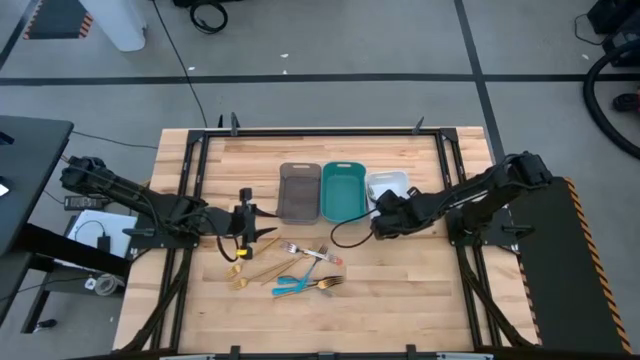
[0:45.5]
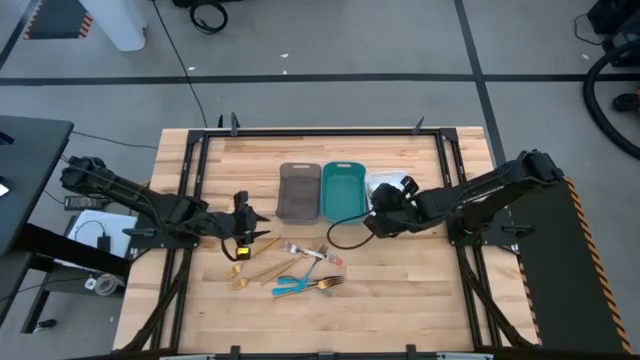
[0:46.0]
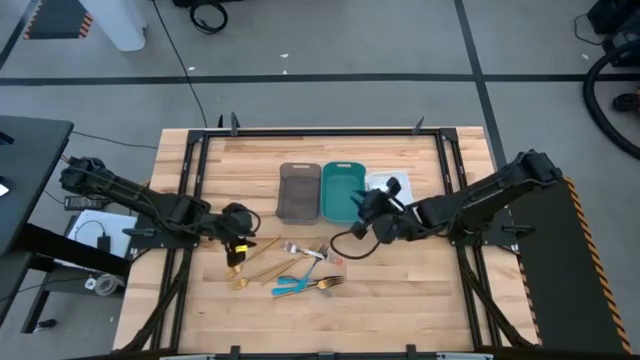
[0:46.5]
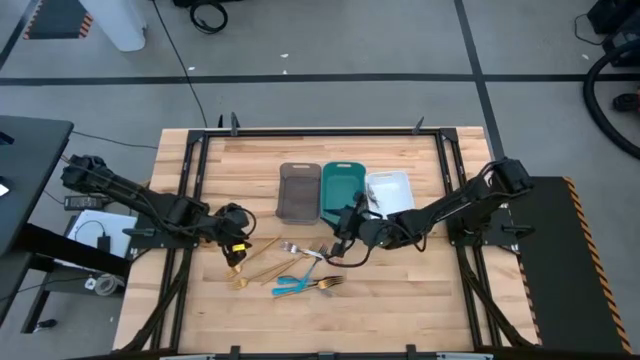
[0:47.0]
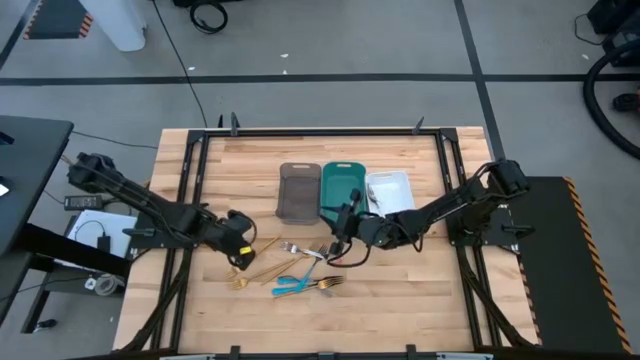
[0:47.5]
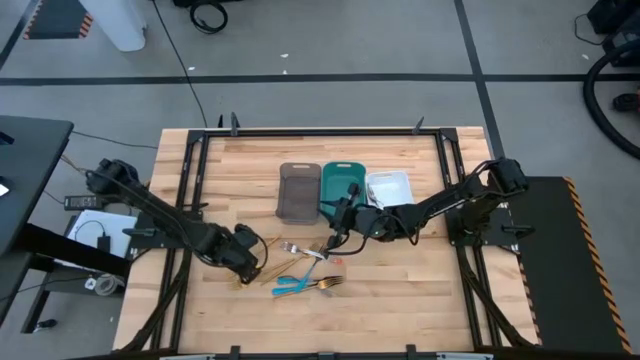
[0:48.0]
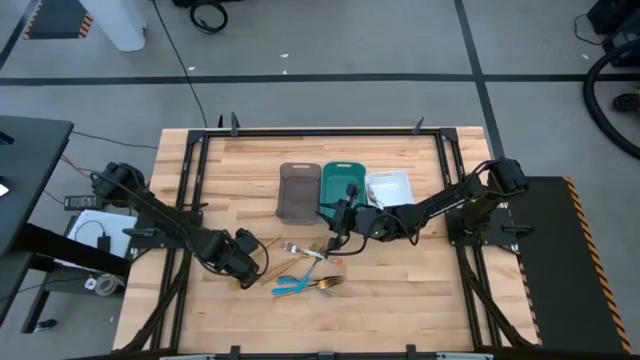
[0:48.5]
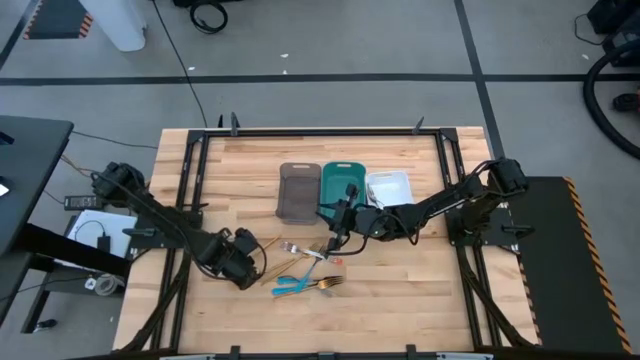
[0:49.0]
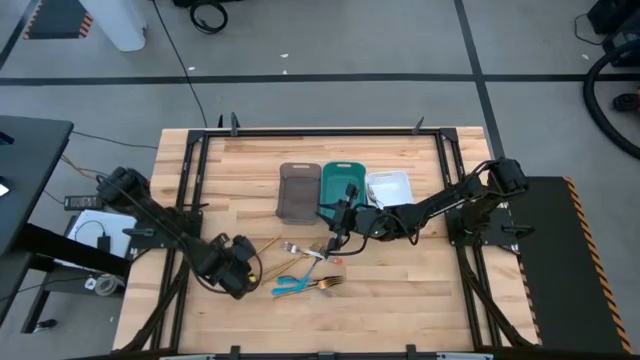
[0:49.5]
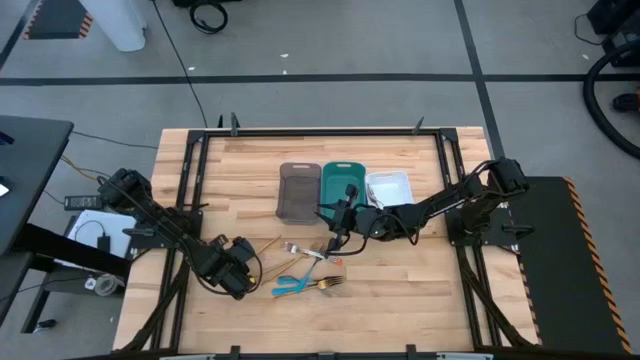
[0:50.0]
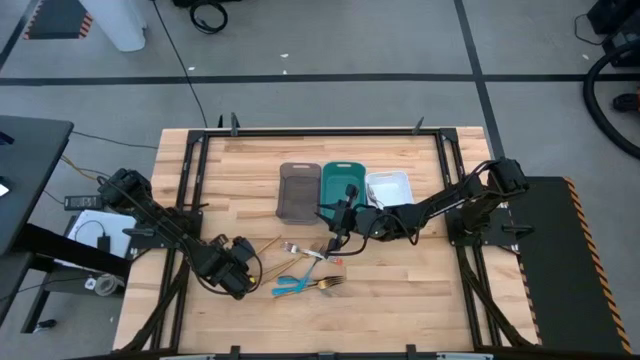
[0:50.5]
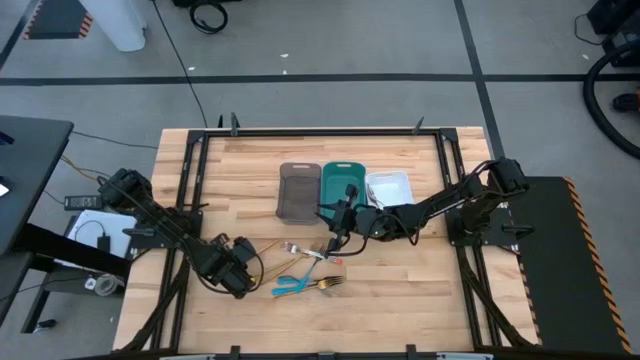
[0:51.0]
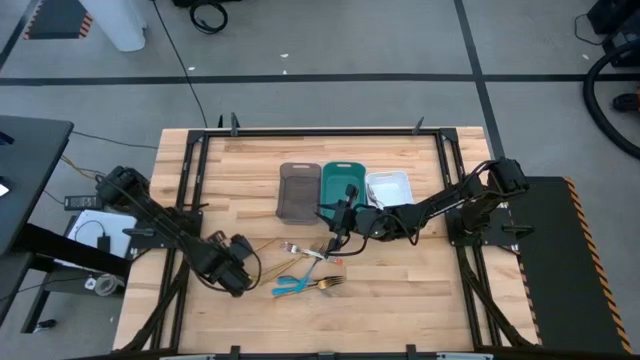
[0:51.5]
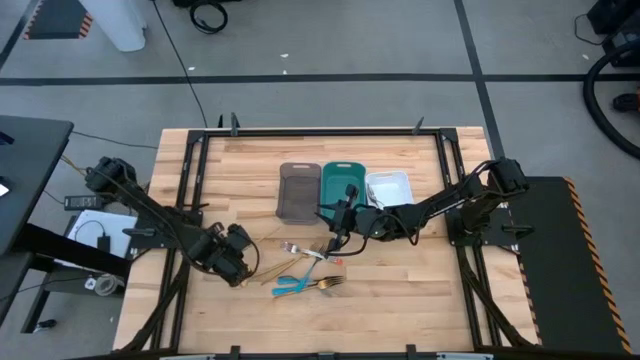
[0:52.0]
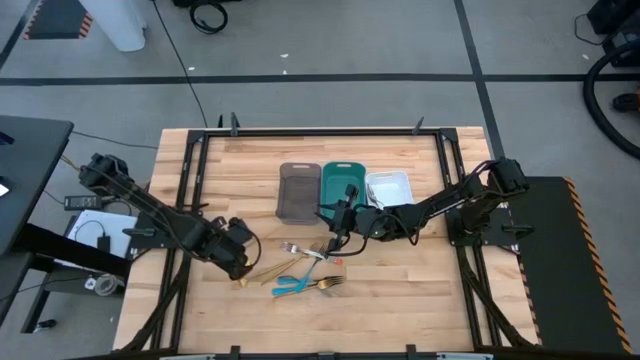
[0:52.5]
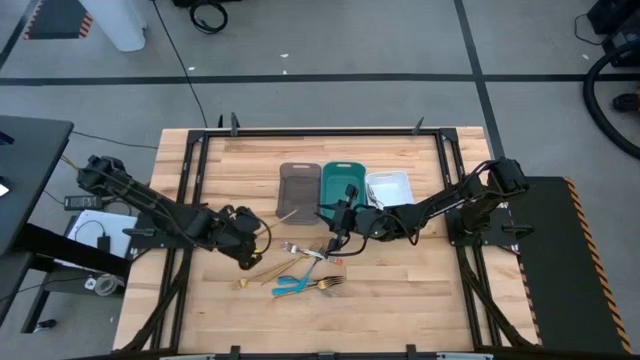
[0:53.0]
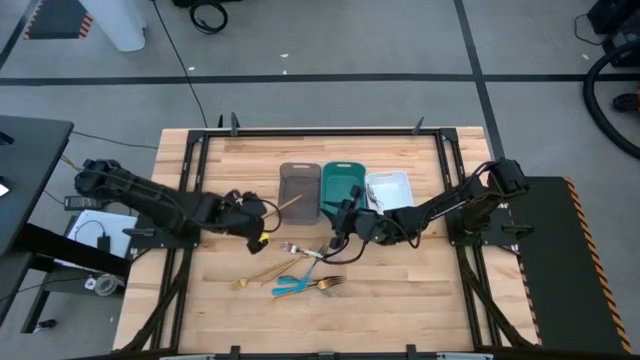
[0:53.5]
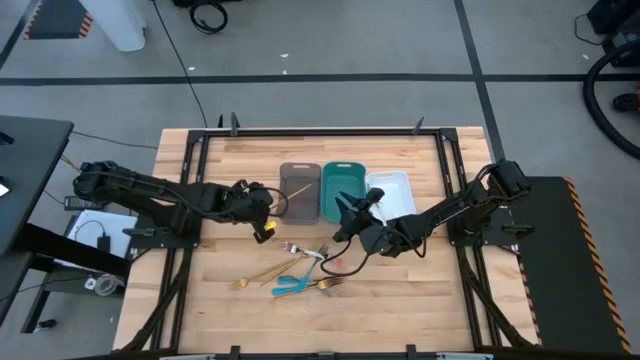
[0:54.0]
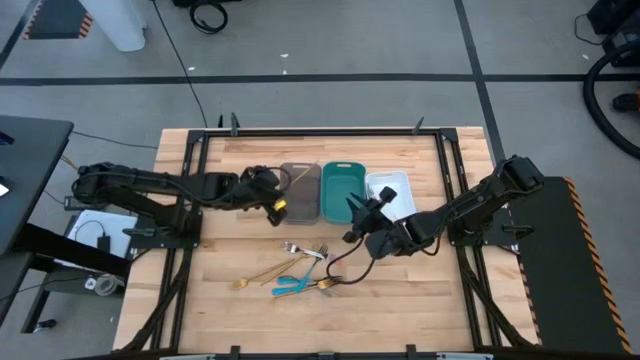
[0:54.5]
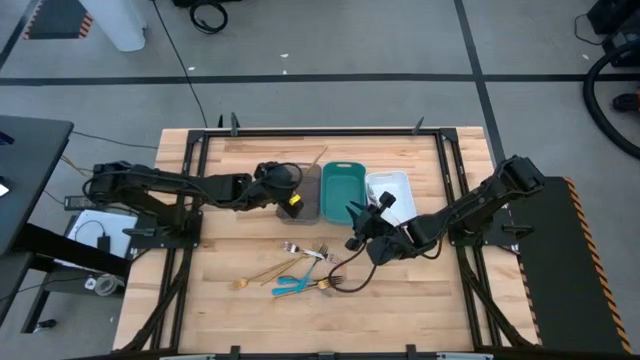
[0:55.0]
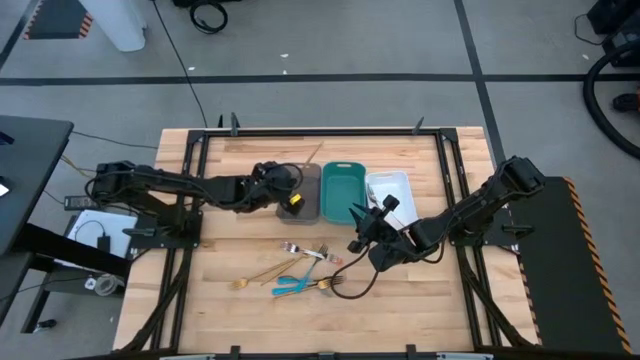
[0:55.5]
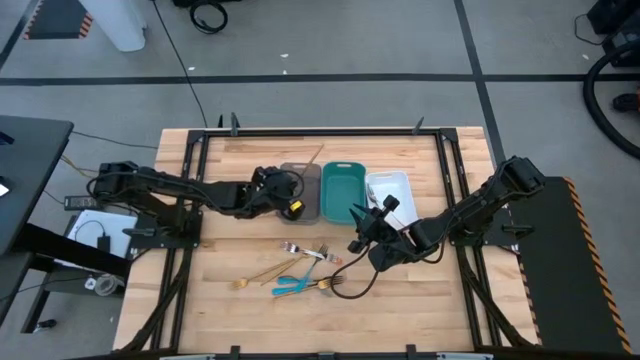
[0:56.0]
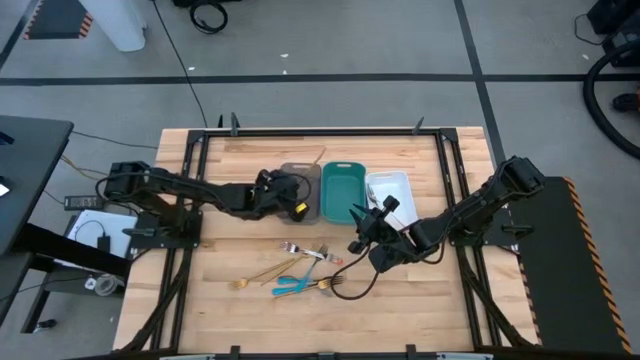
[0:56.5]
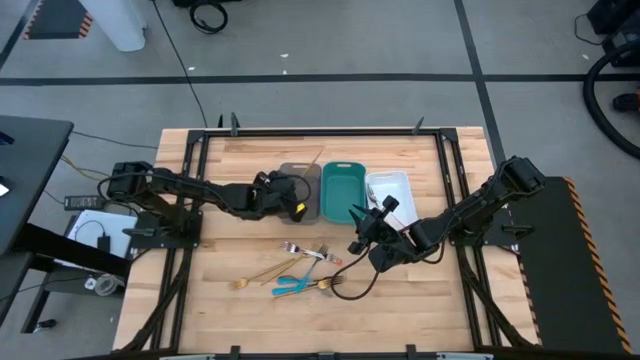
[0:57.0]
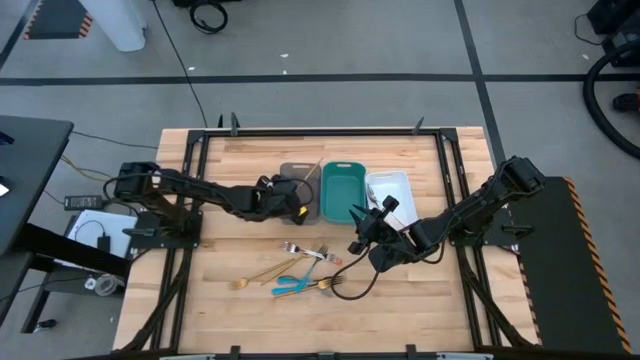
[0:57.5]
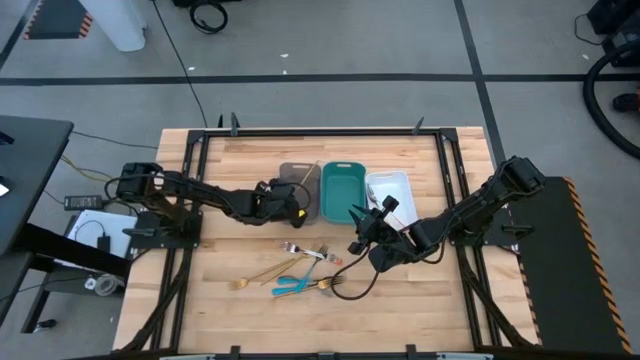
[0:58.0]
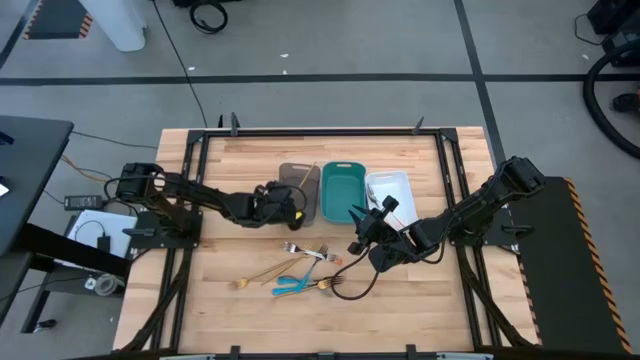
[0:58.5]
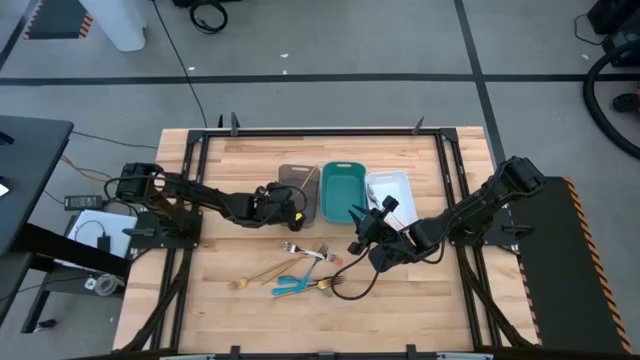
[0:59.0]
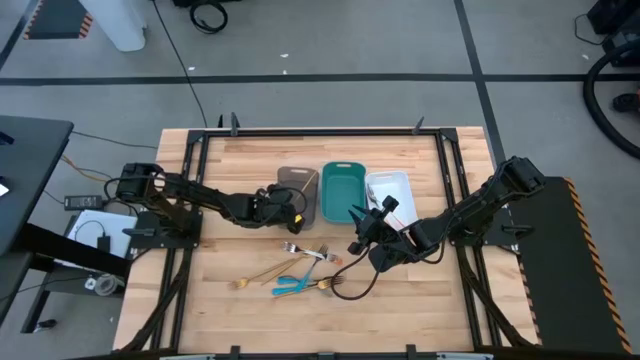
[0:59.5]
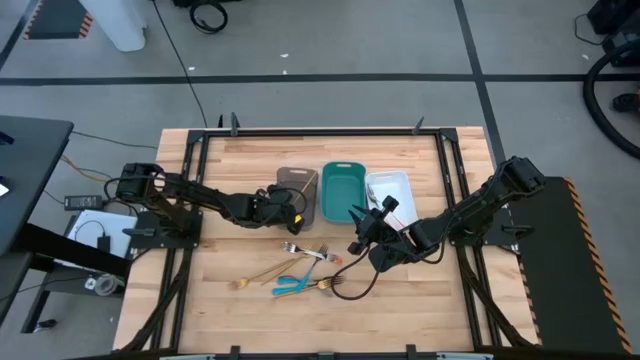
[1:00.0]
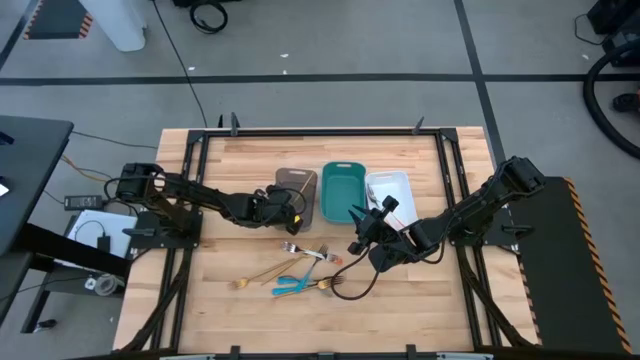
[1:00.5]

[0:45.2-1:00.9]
Task: Sort silverware by color (type)
Put the gold fork into the black bin

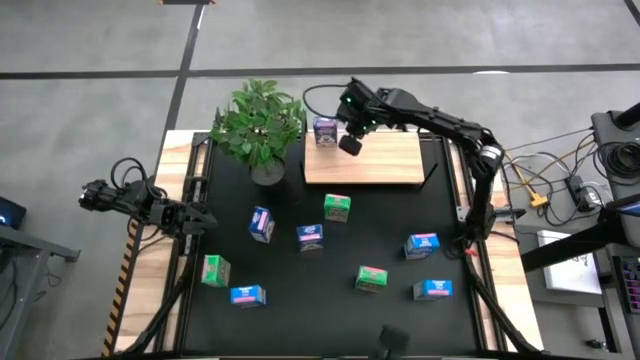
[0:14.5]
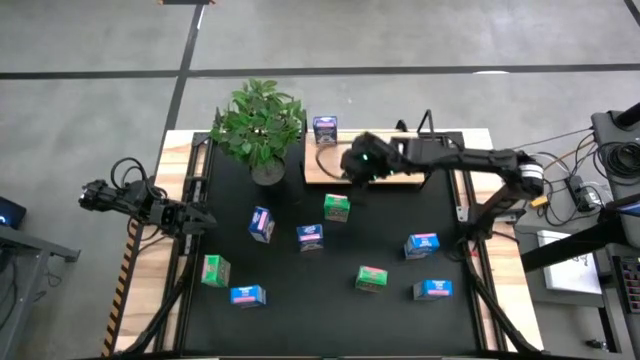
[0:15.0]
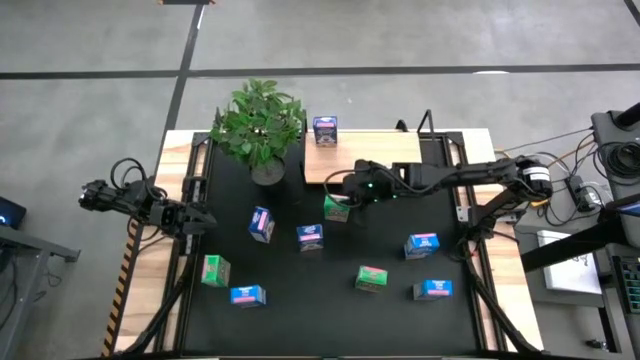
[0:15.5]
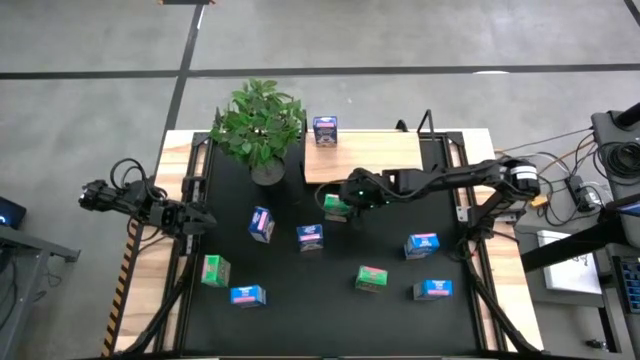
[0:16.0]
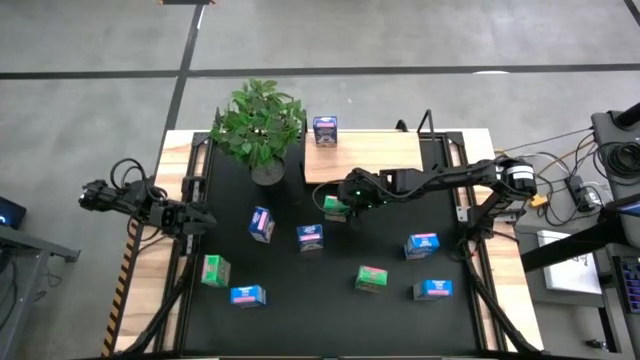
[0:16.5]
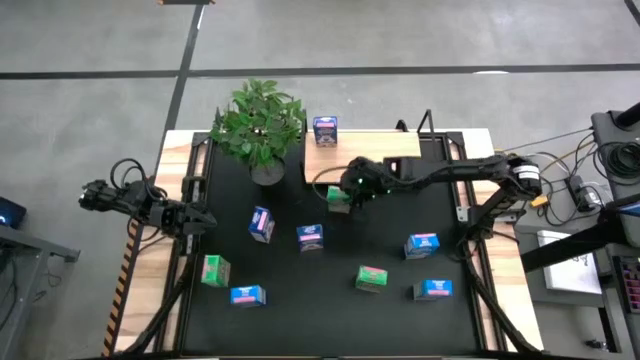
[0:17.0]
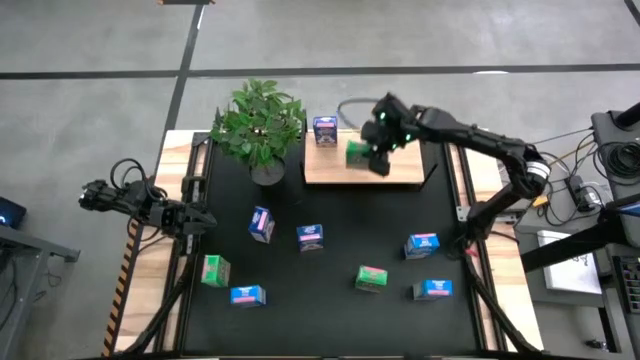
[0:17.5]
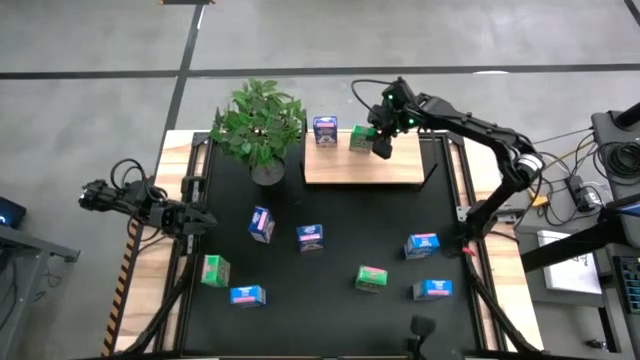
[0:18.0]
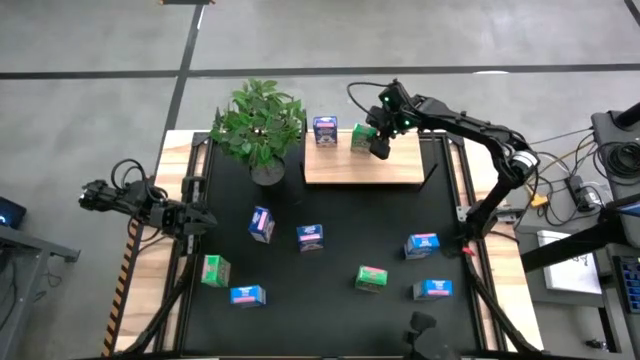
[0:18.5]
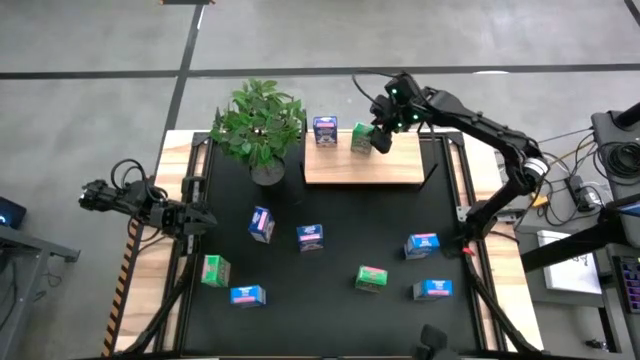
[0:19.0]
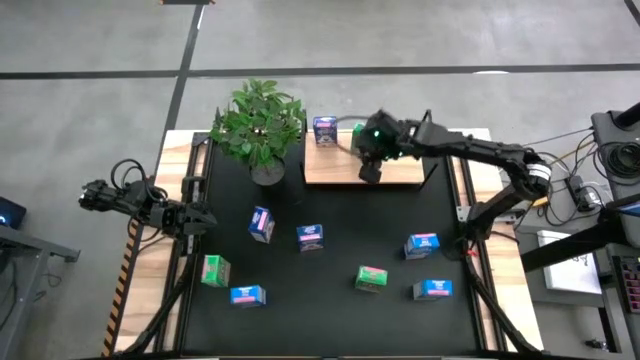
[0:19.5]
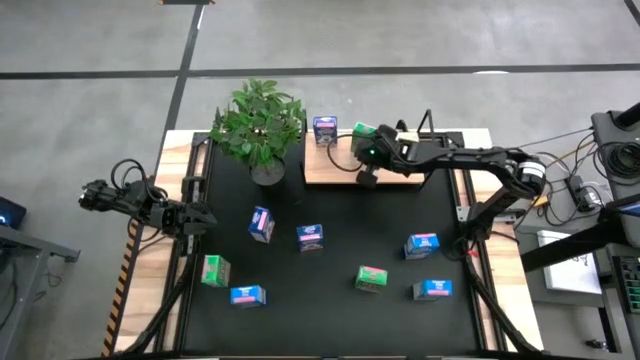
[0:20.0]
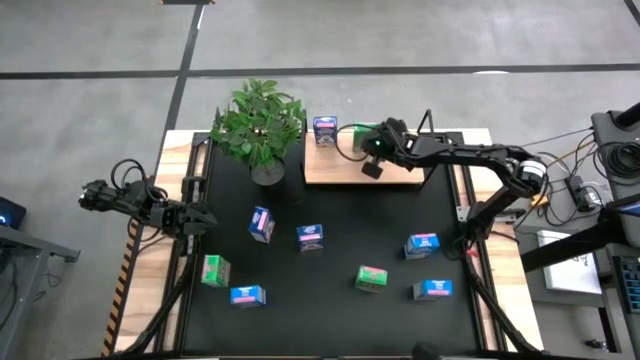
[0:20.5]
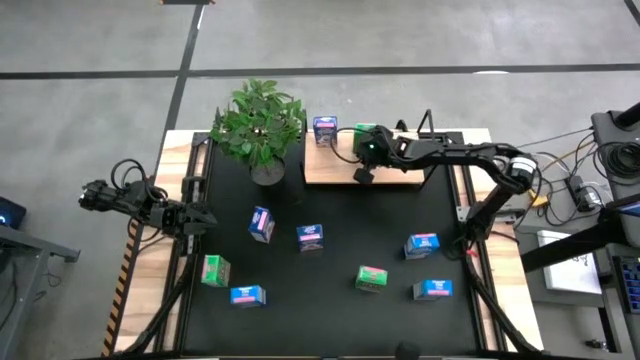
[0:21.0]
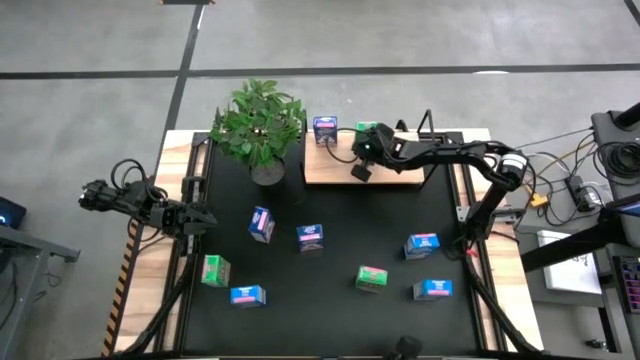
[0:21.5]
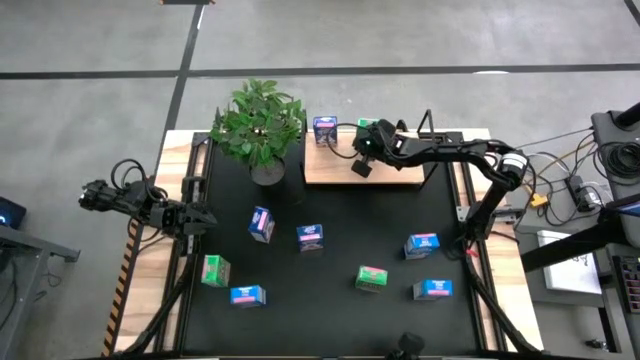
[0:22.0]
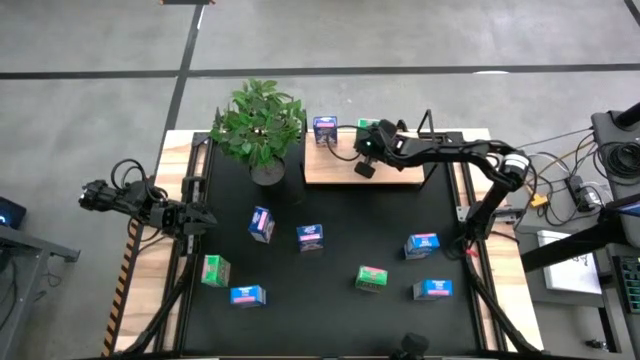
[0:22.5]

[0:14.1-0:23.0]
Task: Stack cereal on shelf
Put the top green cereal box on the shelf
